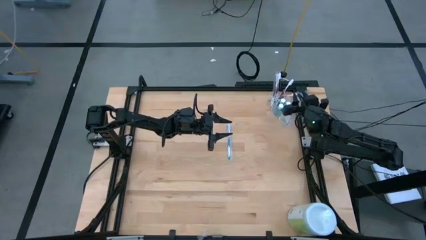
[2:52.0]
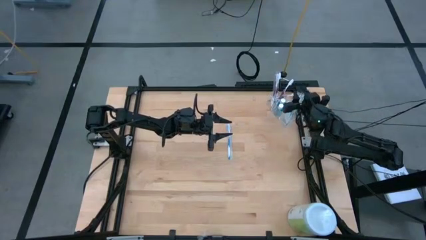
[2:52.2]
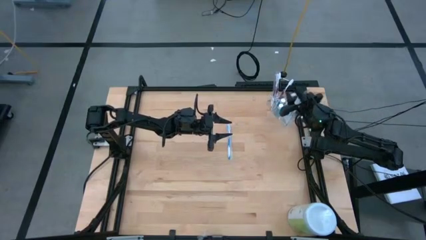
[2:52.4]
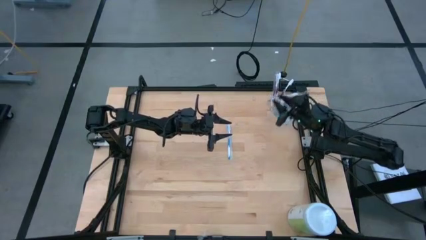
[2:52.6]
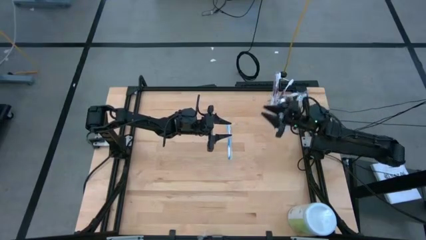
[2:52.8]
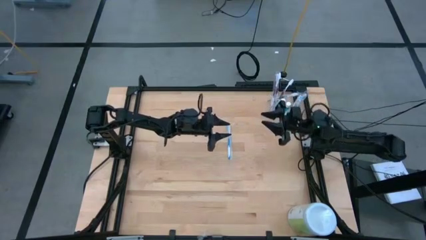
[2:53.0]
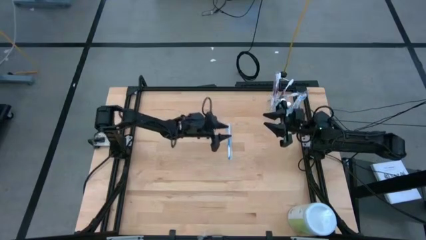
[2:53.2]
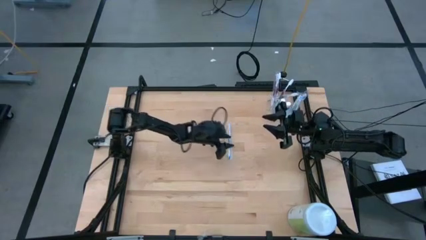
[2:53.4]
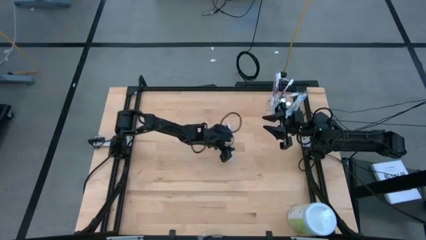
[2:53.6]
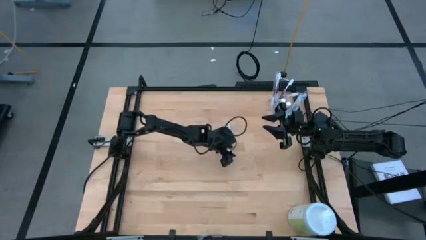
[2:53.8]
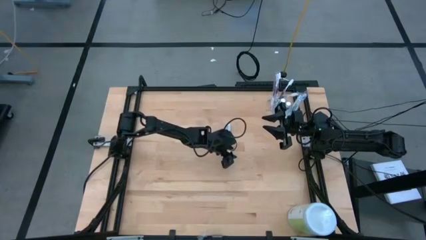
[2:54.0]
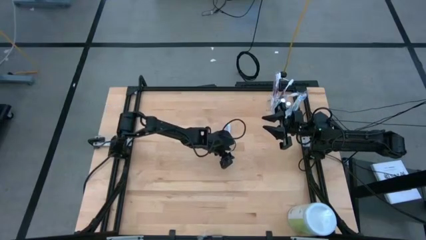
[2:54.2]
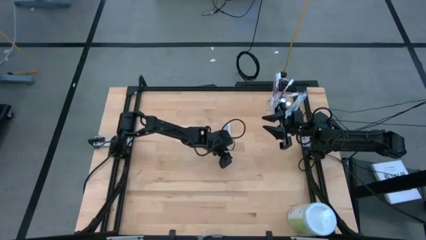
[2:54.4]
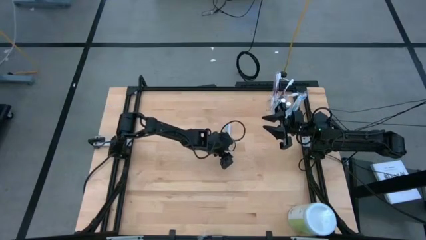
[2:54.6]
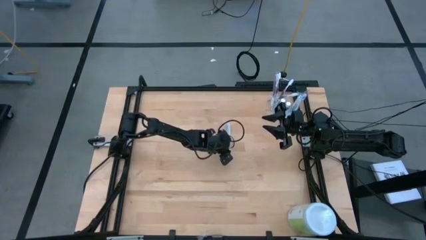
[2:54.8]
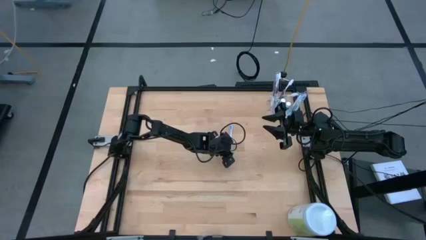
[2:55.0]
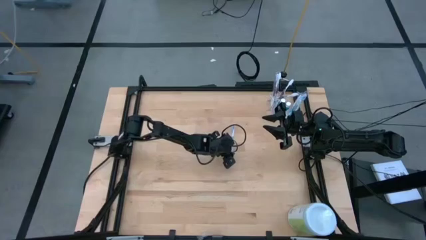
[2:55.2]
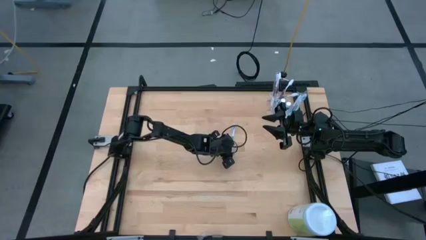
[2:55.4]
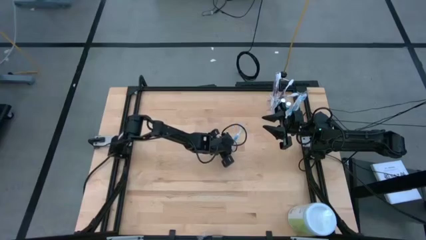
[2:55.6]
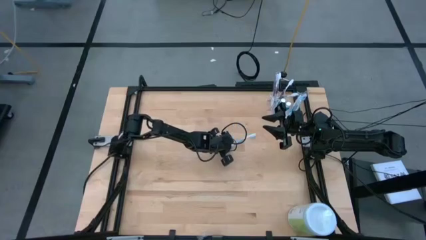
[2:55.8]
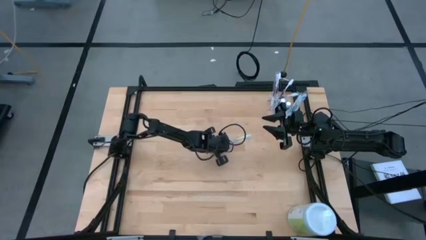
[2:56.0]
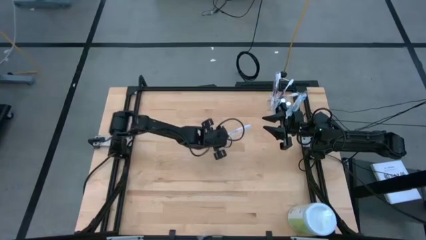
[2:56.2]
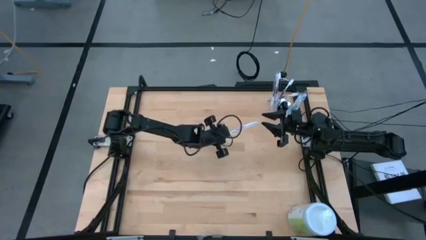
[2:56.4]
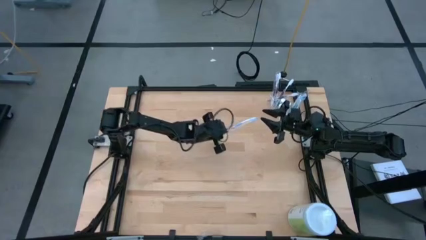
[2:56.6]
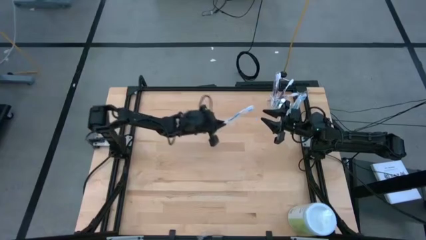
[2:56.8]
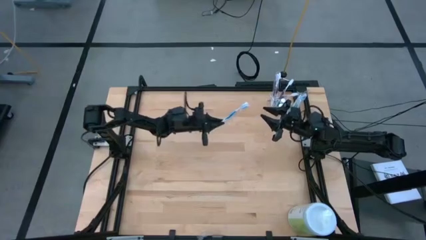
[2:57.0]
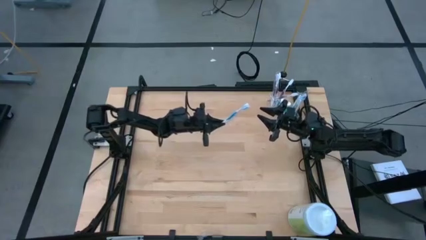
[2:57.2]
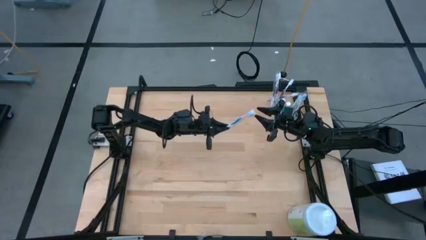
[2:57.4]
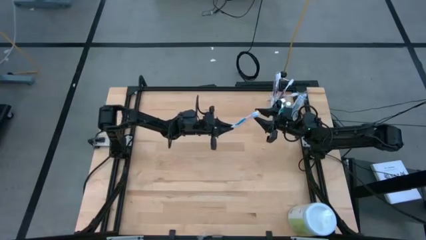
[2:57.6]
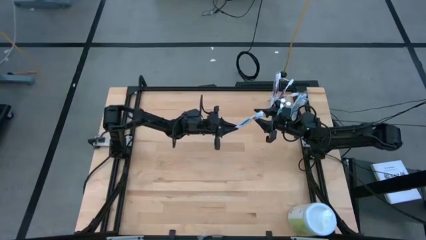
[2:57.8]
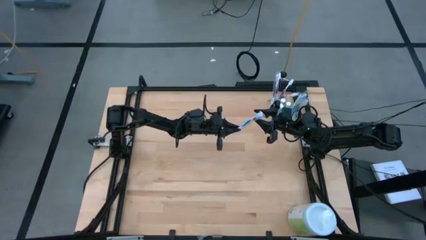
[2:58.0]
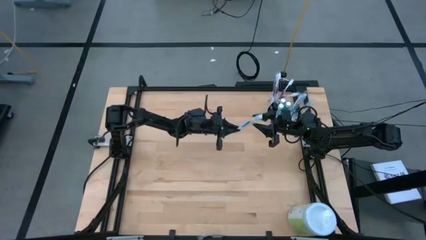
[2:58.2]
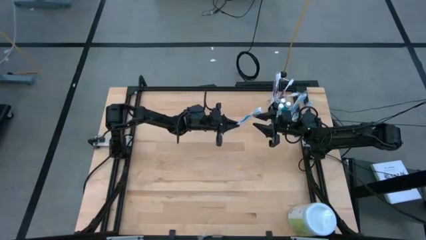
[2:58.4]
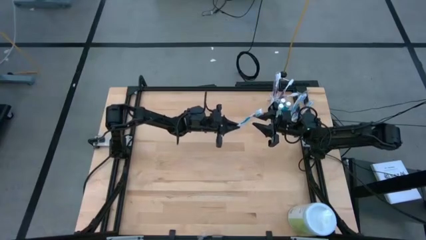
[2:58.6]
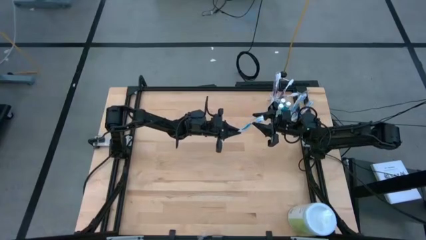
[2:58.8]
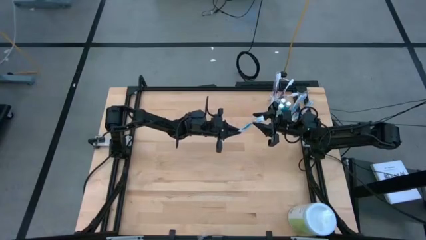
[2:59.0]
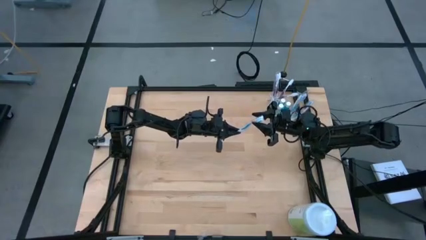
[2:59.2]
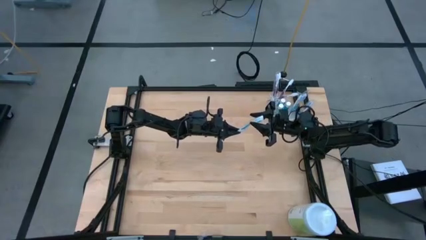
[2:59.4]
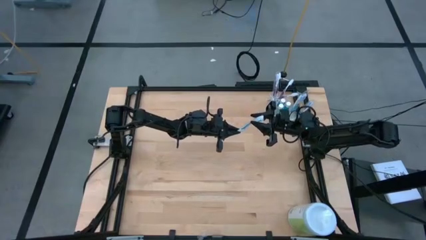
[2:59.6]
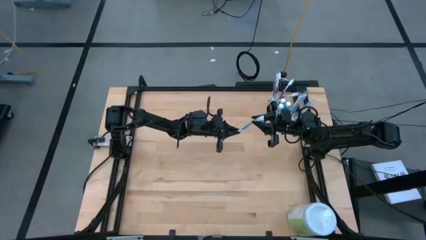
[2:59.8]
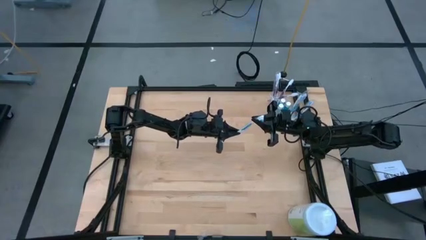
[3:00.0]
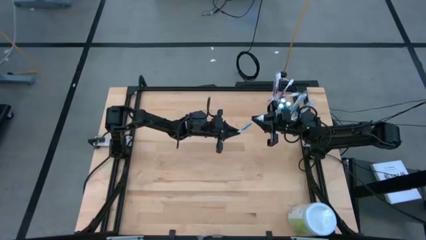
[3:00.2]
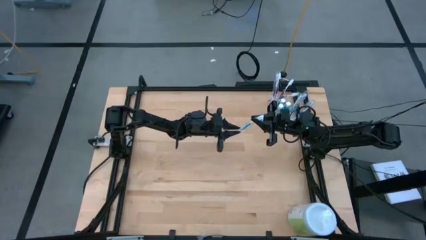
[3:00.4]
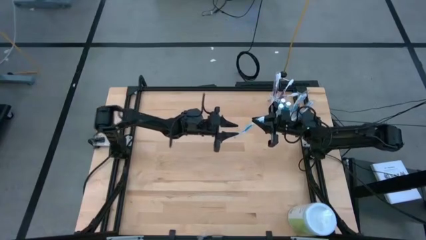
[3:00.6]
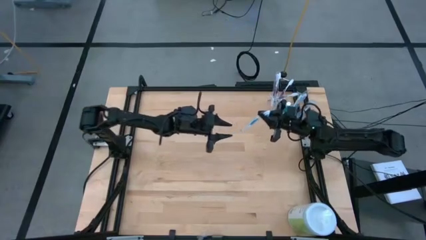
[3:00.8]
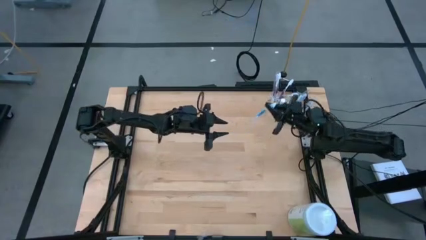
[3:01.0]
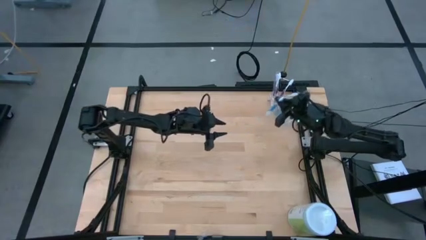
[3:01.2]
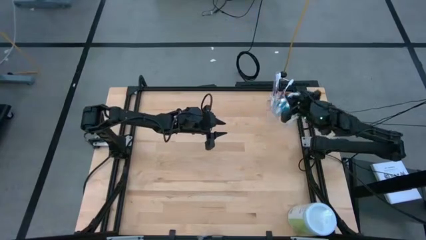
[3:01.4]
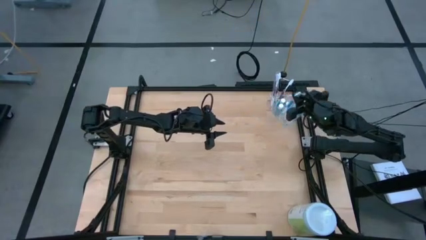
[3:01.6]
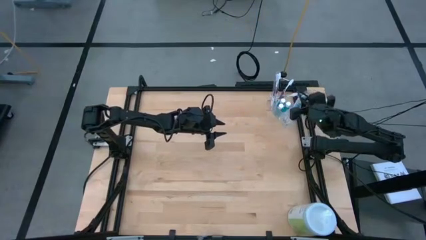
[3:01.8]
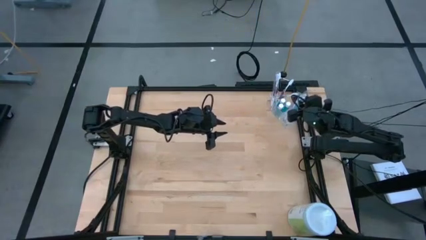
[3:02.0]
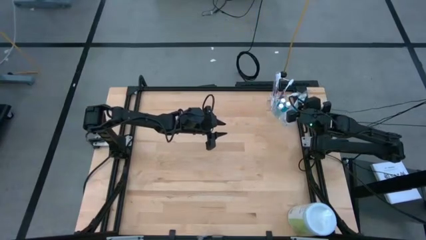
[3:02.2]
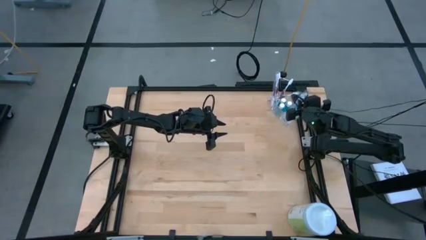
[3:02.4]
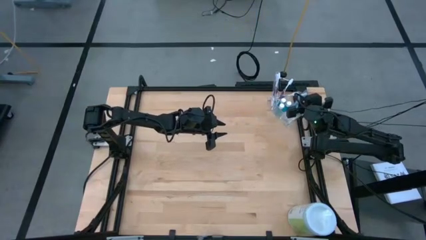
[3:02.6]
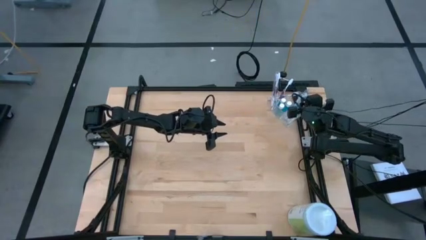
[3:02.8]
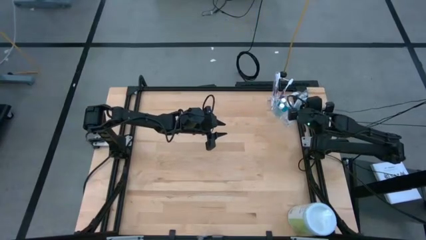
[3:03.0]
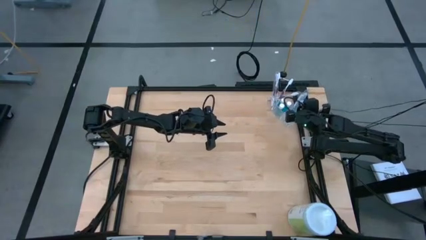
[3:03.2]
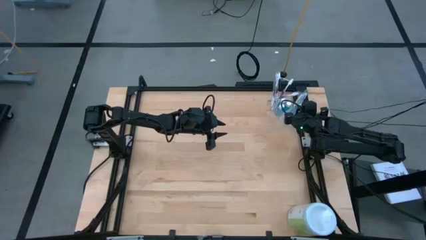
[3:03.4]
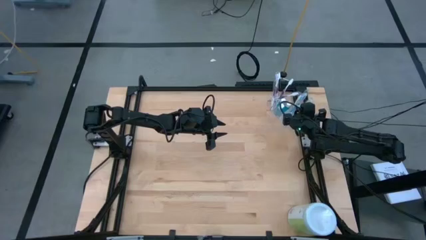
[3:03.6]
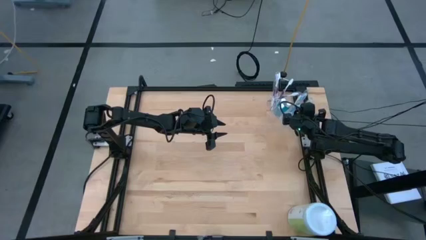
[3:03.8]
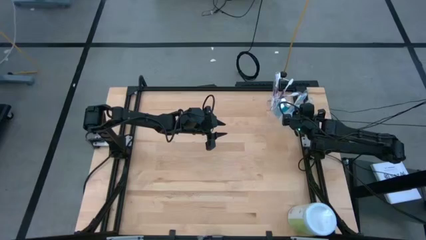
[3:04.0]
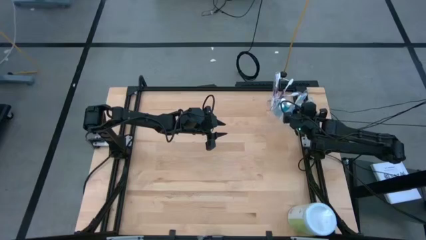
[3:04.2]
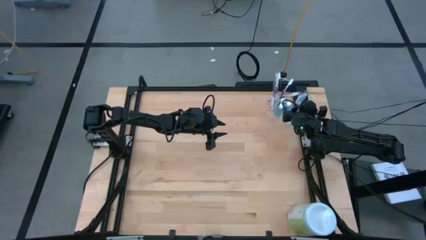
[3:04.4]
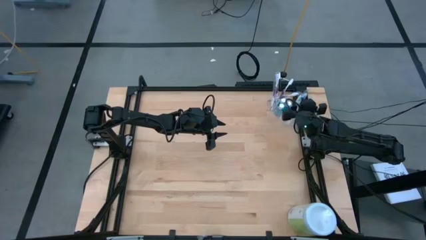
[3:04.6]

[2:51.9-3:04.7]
Task: Pick & Place toothbrushing station
Put the blue toothbrush into the right of the transparent organizer
